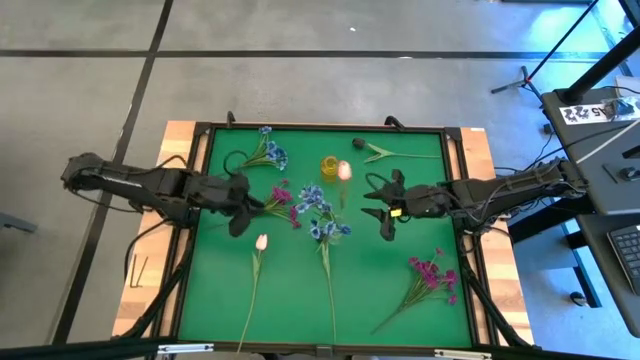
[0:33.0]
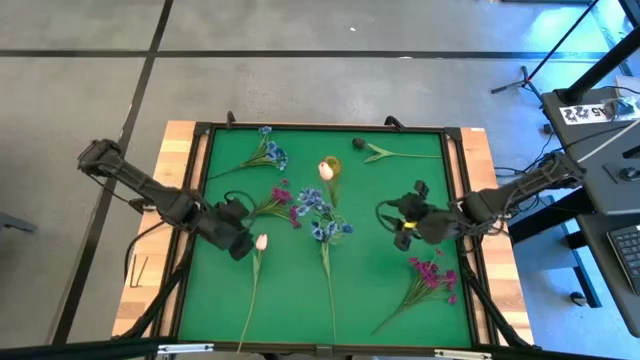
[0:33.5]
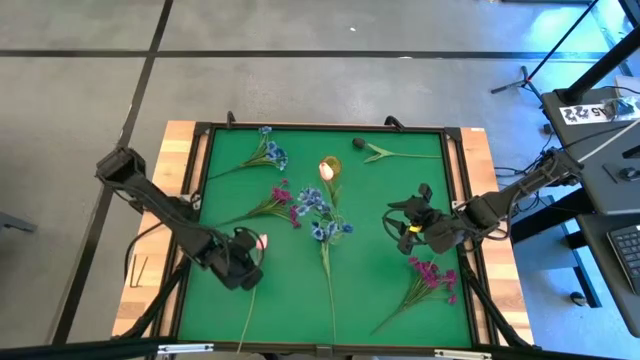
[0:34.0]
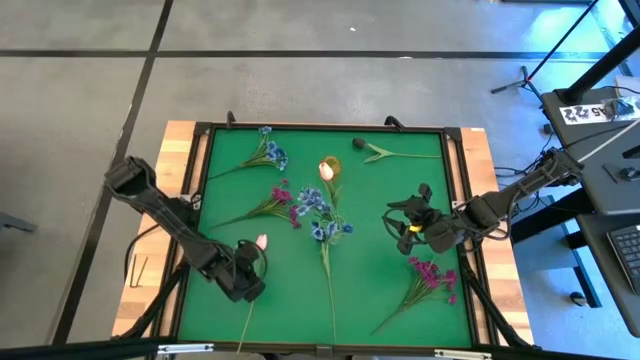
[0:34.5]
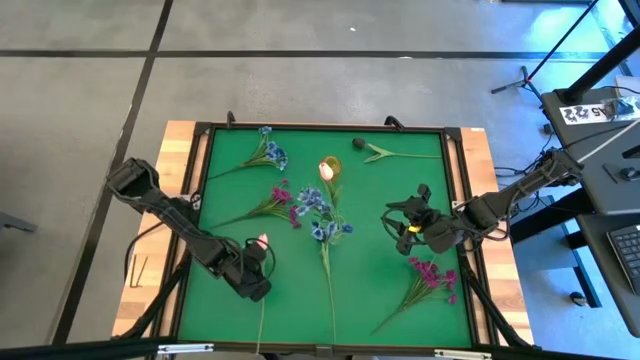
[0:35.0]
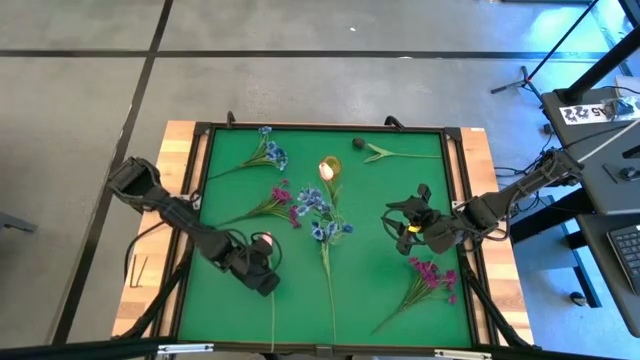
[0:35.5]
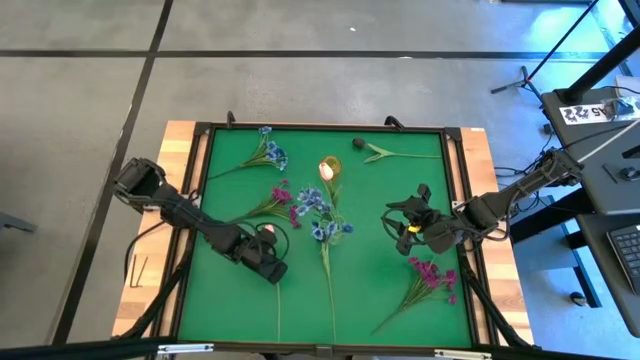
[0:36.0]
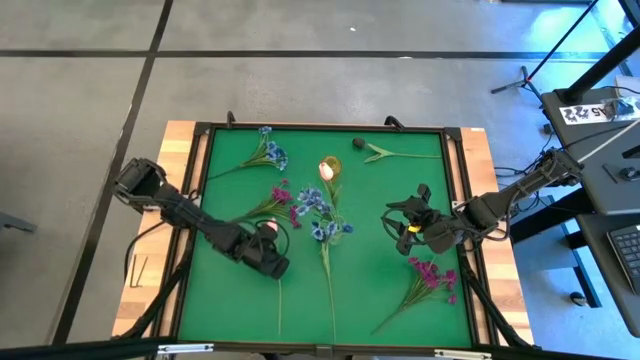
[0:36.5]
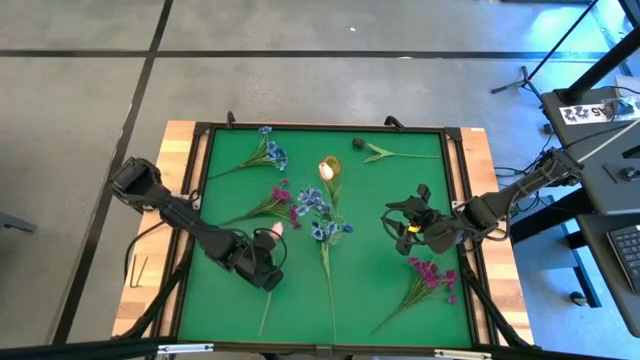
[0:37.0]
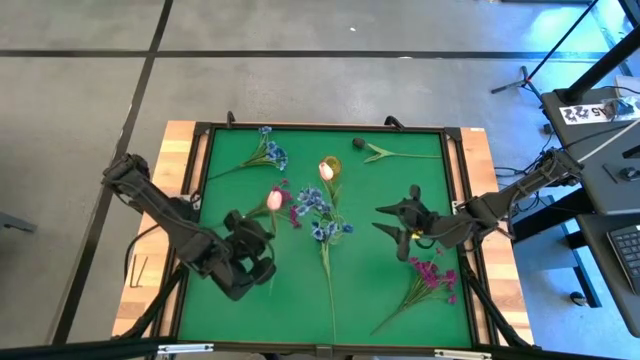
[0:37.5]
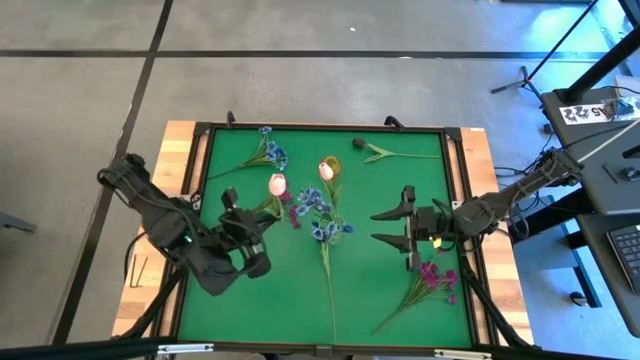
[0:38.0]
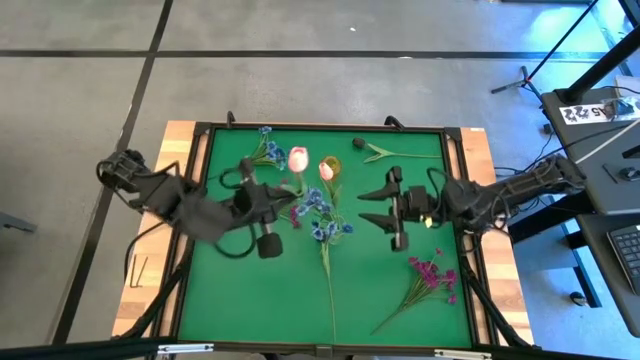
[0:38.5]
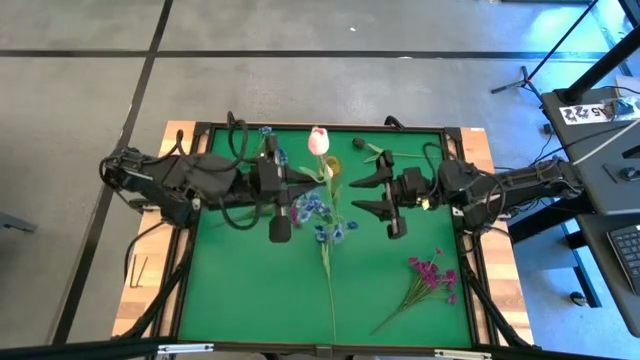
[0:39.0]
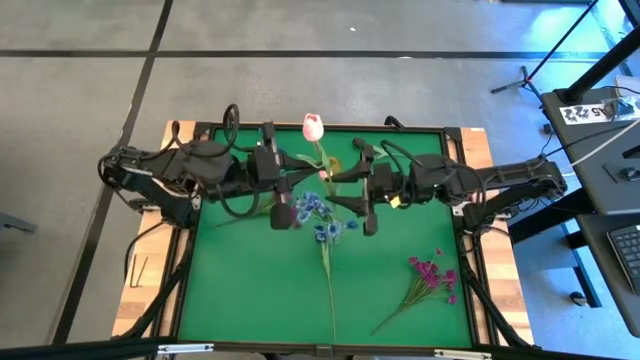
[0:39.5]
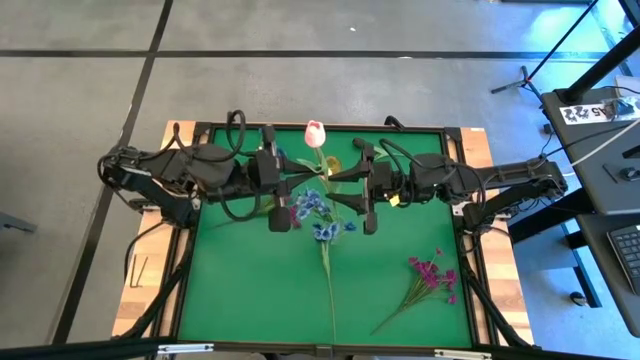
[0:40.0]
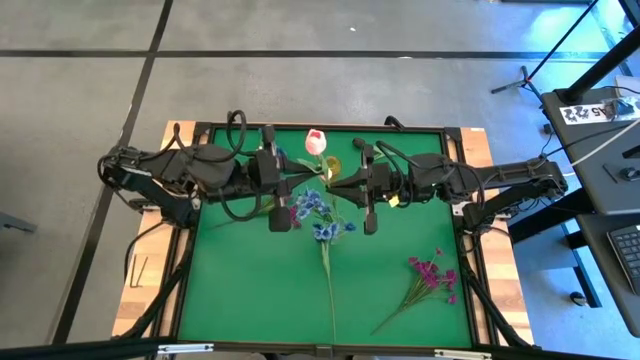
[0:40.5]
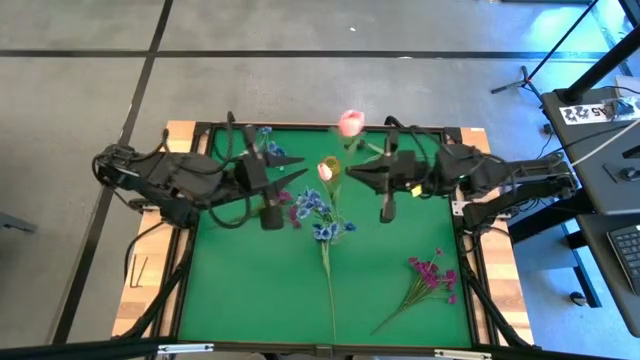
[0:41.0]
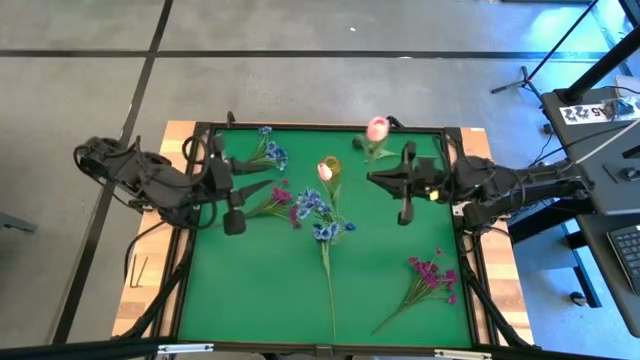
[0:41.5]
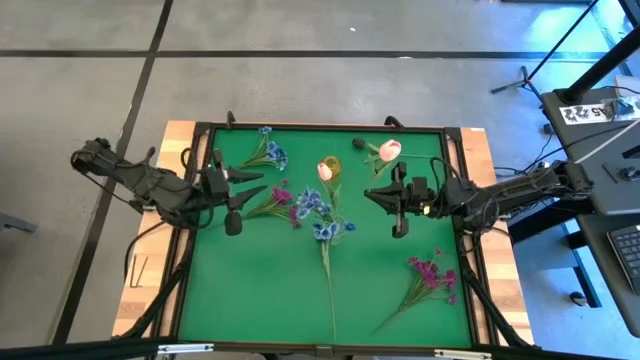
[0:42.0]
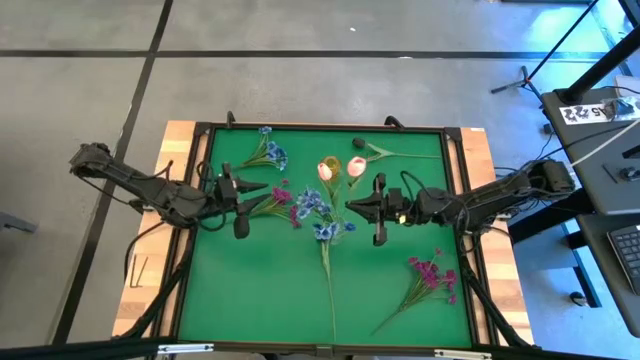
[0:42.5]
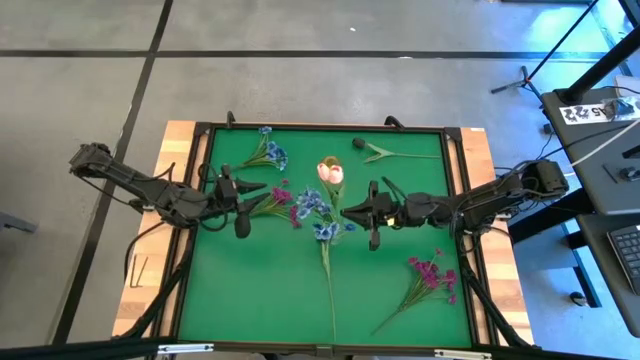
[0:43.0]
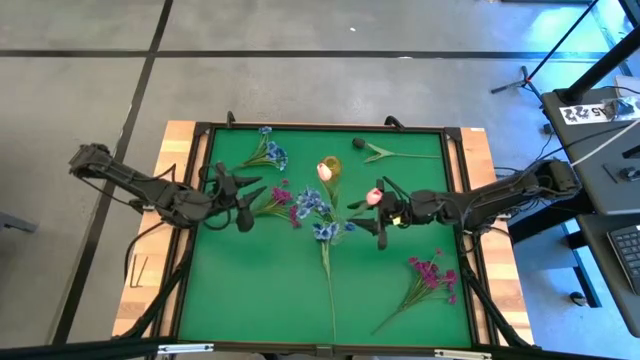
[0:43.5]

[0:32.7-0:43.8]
Task: Sort flowers into vase by color
Put the pink flower into the transparent vase

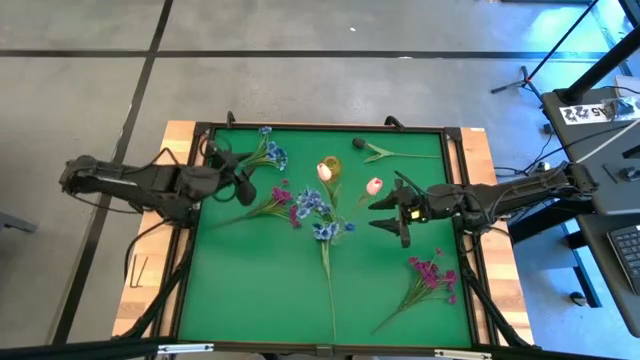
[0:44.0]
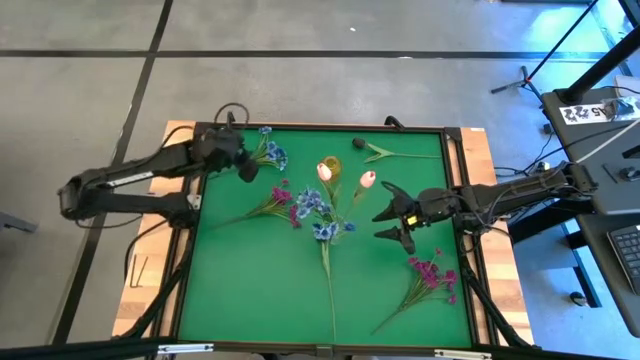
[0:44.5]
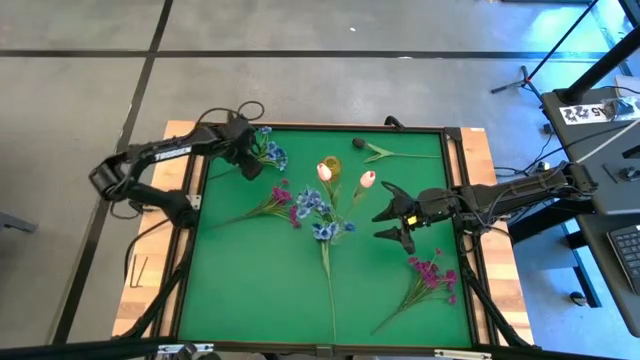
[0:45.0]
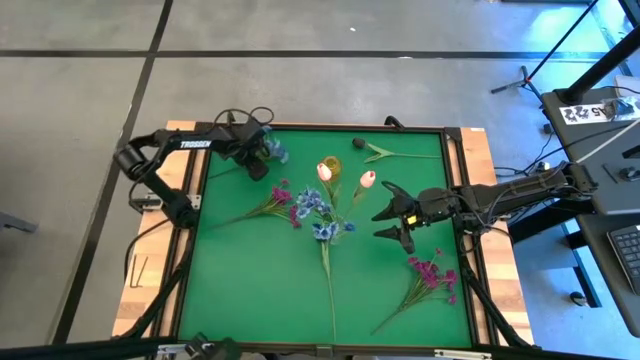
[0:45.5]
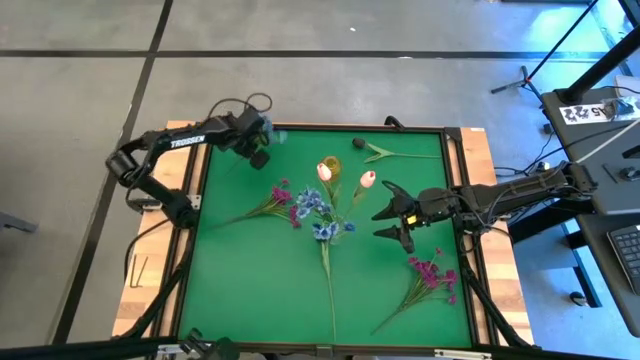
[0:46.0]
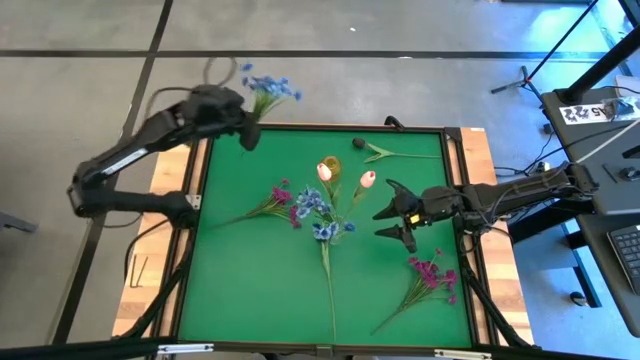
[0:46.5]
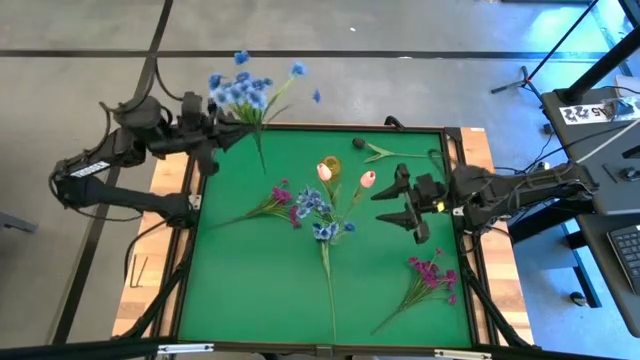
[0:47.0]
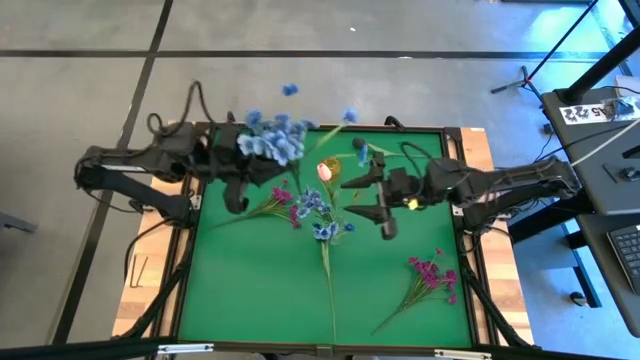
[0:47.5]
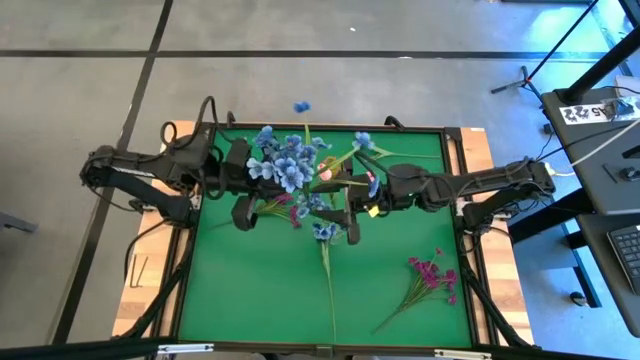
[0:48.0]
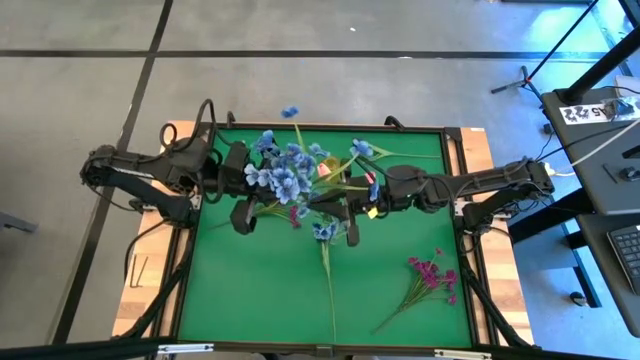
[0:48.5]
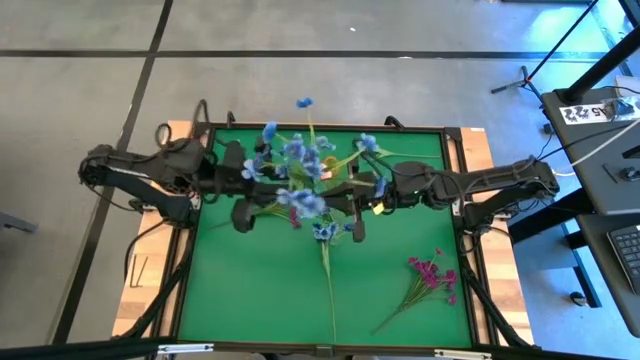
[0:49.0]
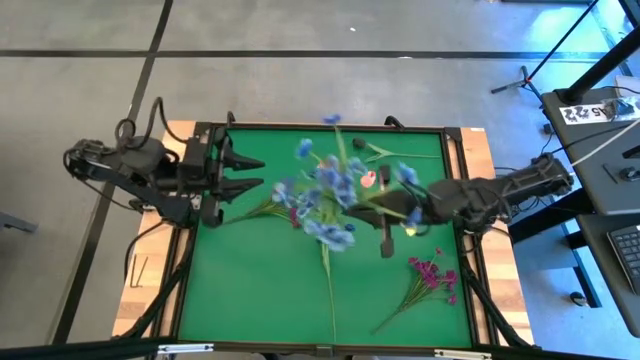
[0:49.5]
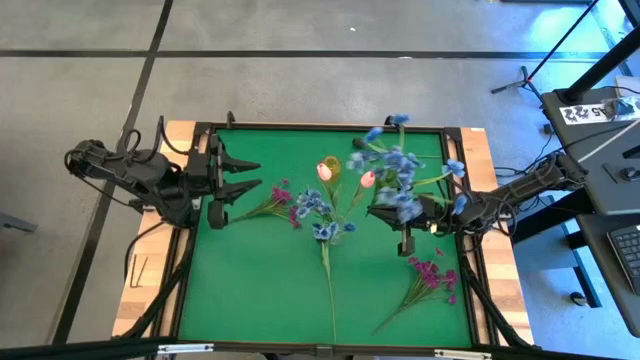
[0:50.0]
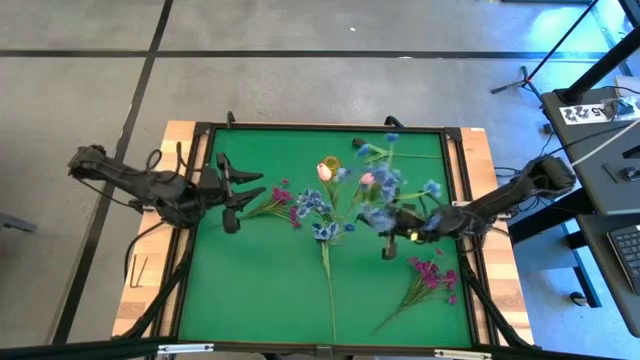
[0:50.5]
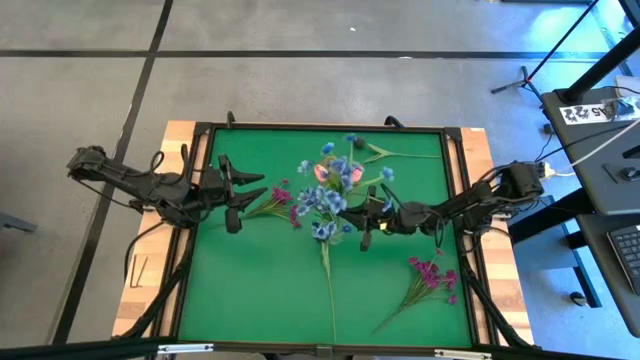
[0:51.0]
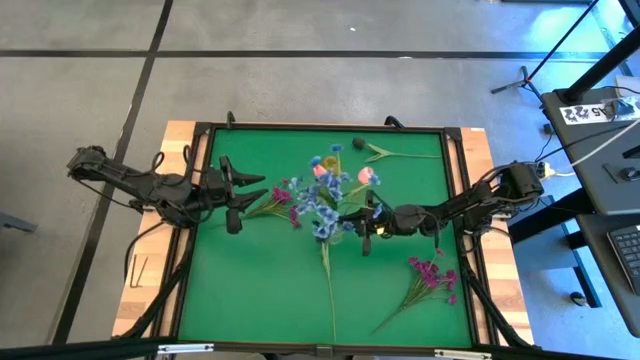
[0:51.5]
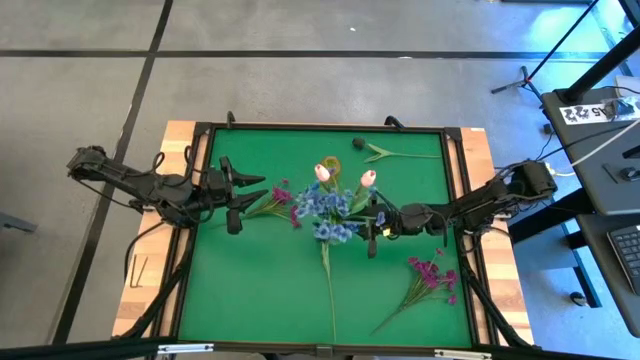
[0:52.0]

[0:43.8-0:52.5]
Put the blue flowers into the transparent vase

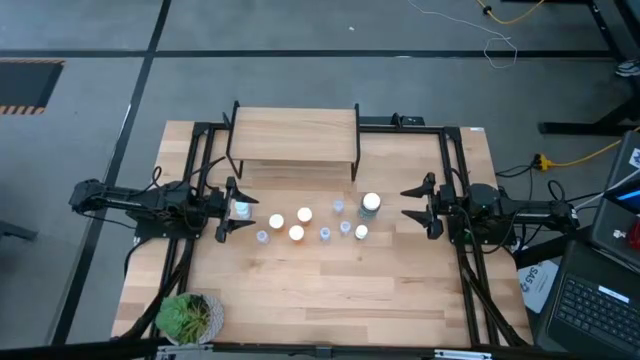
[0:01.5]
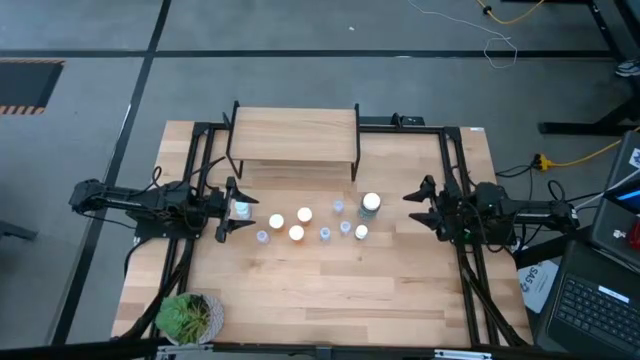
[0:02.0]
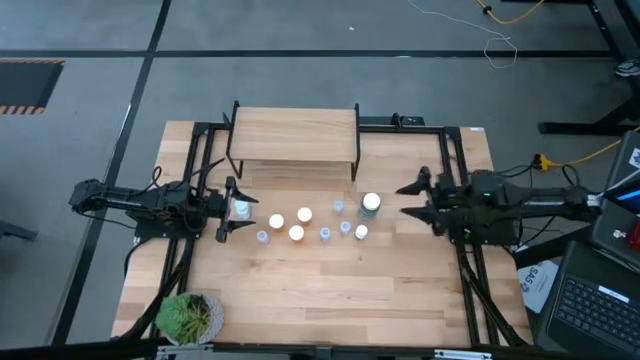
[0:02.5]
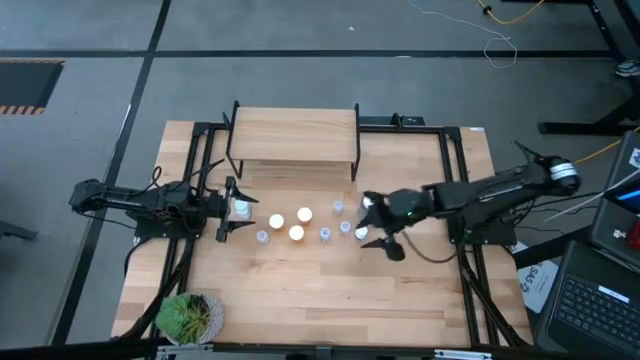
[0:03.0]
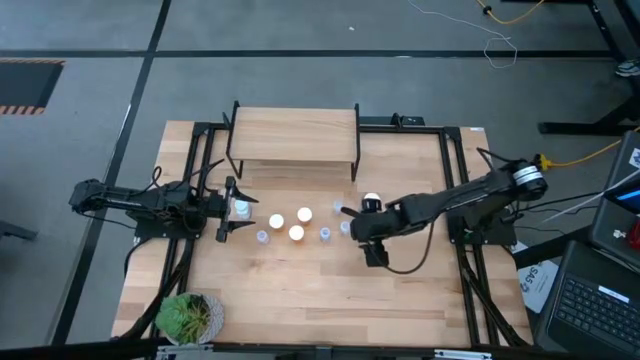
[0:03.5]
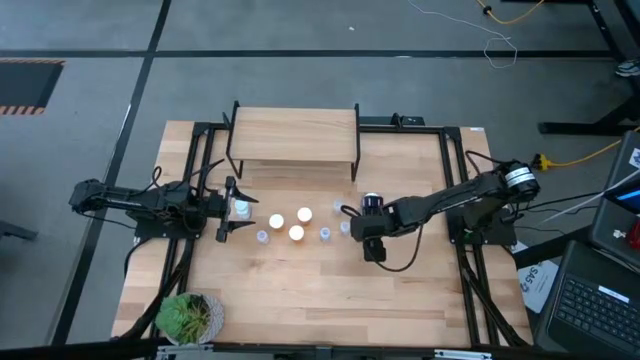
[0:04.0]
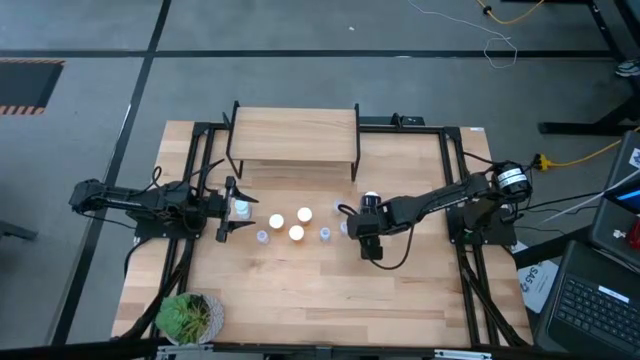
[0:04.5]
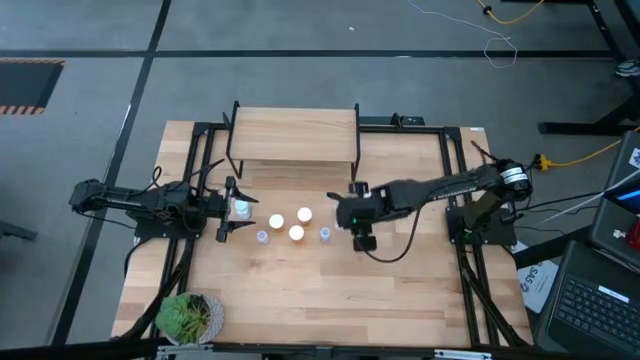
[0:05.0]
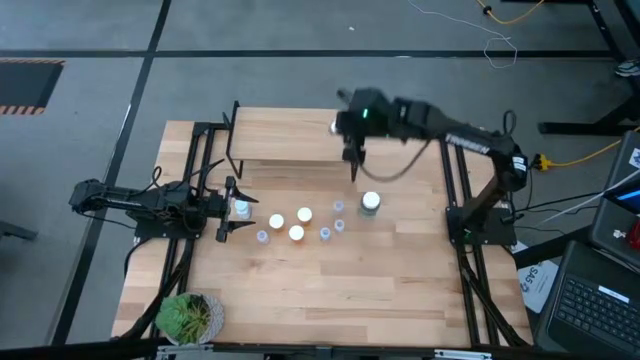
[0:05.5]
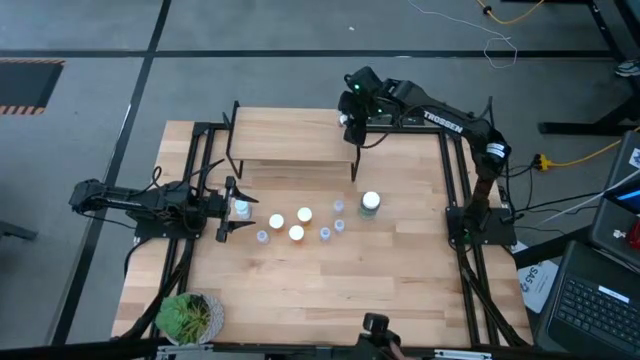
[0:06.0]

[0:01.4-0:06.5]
Task: Pick and place medicine bottles onto shelf by color
Put the white pill bottle on the shelf
